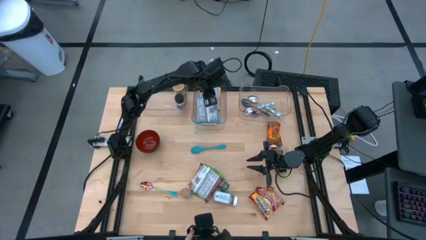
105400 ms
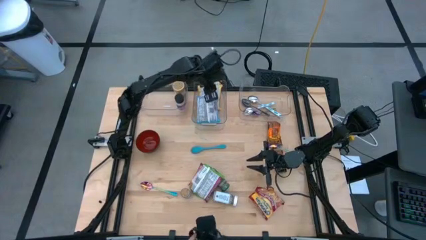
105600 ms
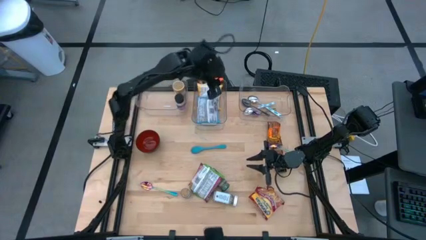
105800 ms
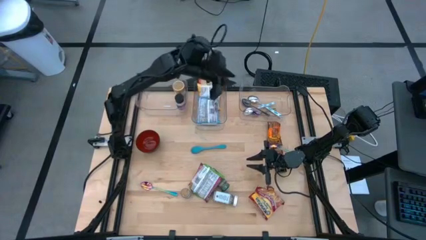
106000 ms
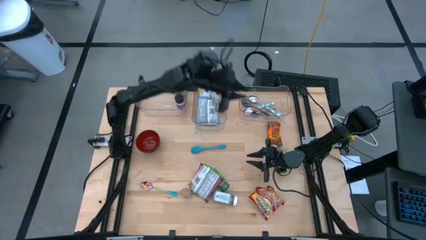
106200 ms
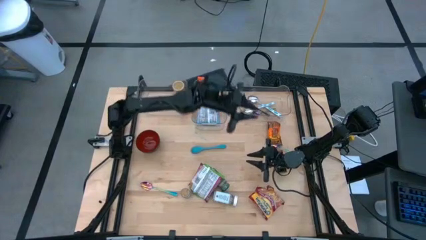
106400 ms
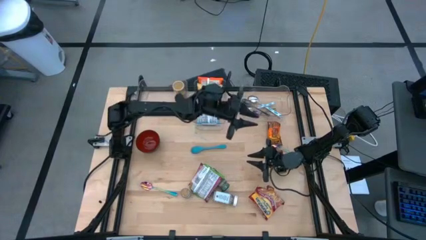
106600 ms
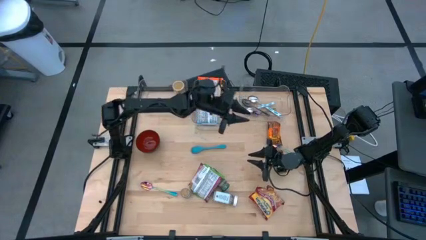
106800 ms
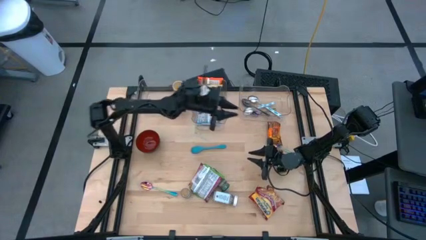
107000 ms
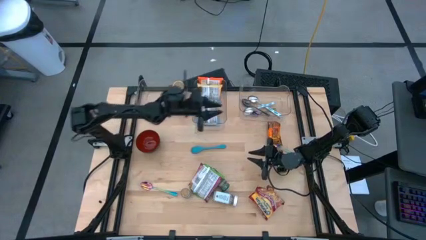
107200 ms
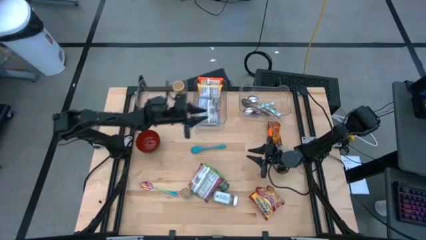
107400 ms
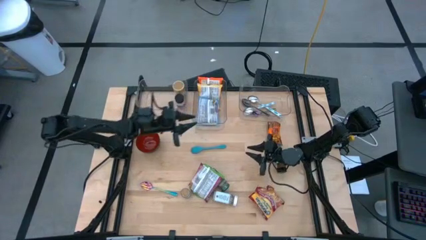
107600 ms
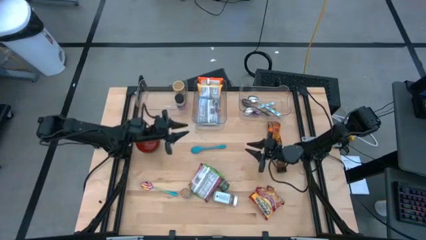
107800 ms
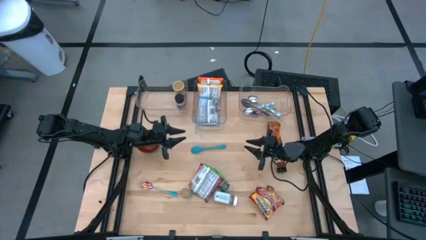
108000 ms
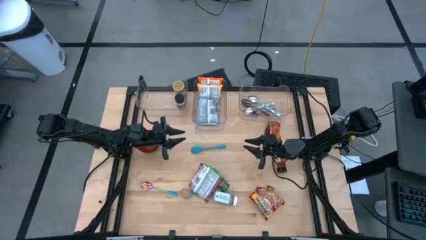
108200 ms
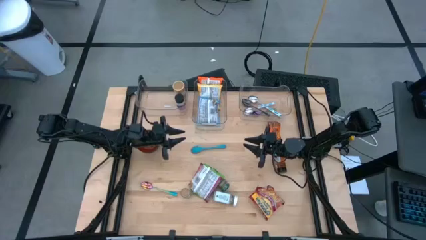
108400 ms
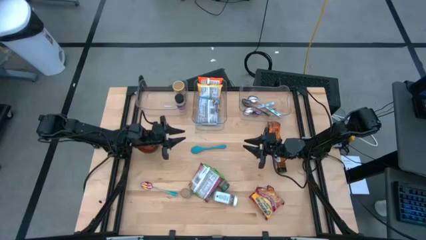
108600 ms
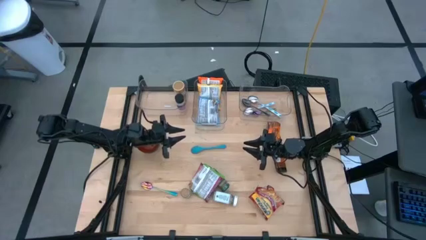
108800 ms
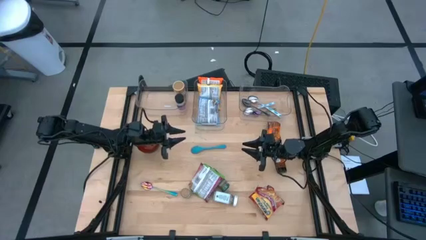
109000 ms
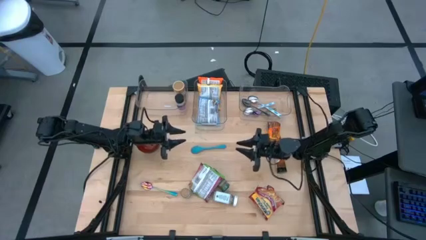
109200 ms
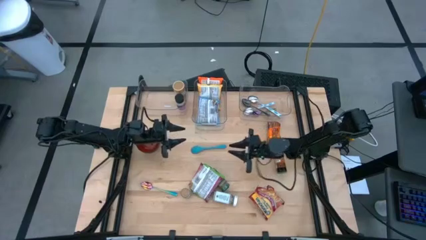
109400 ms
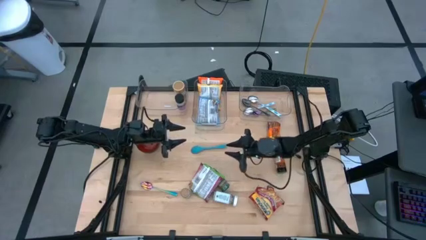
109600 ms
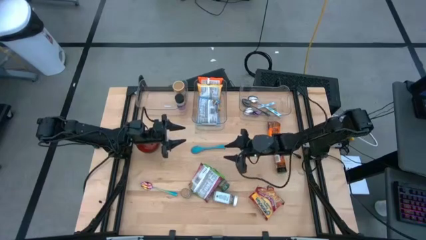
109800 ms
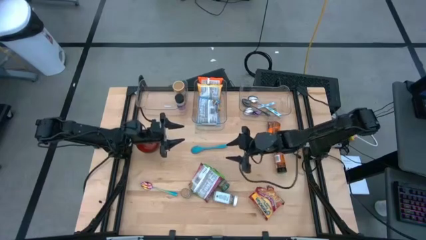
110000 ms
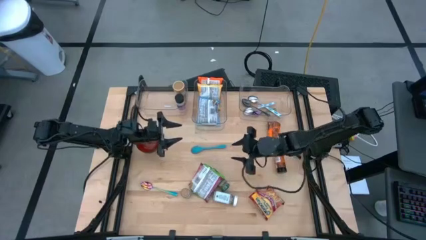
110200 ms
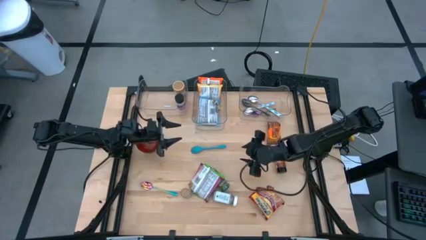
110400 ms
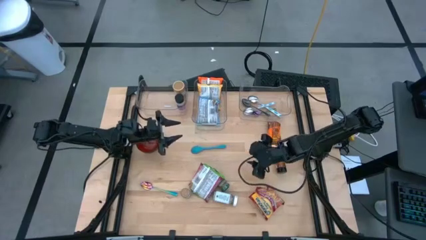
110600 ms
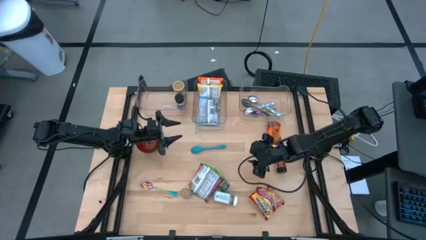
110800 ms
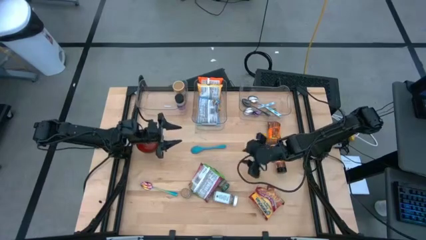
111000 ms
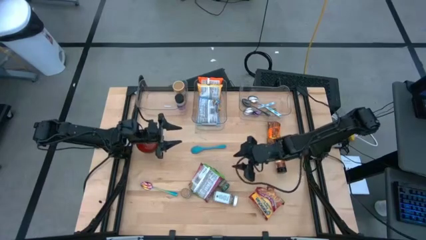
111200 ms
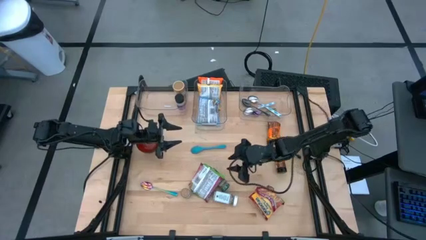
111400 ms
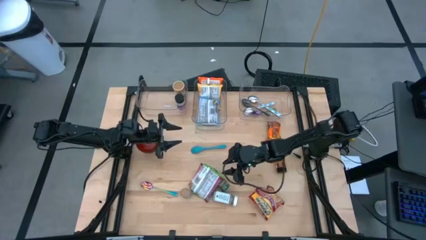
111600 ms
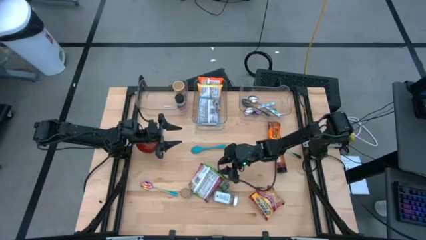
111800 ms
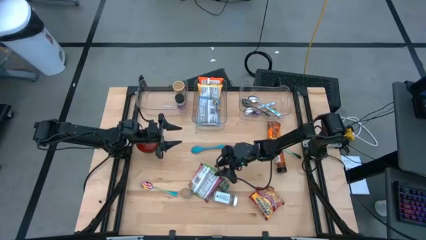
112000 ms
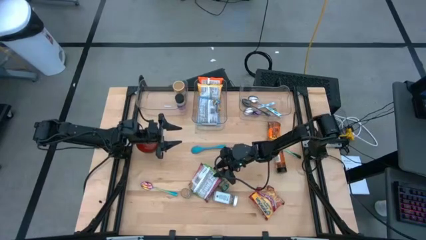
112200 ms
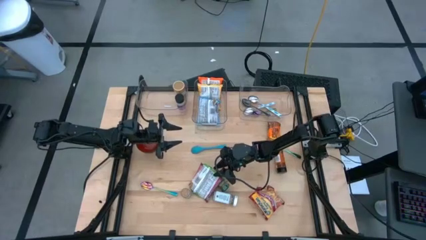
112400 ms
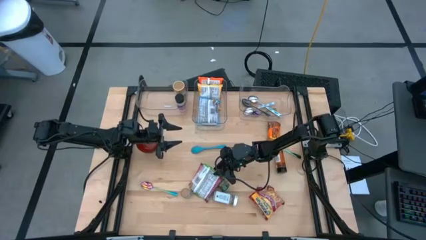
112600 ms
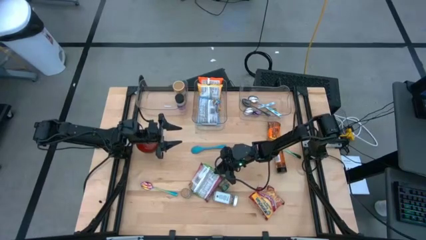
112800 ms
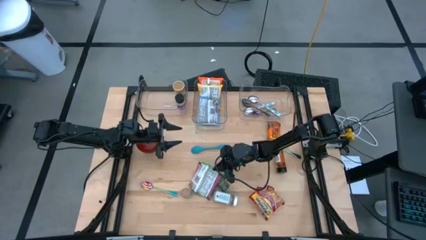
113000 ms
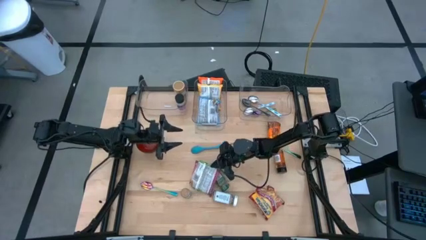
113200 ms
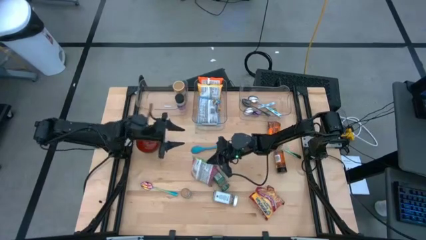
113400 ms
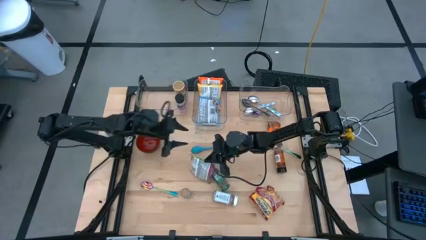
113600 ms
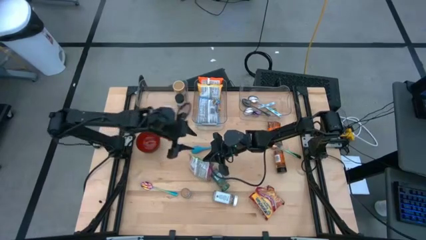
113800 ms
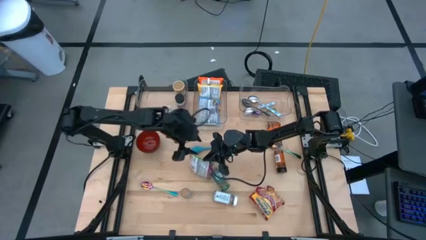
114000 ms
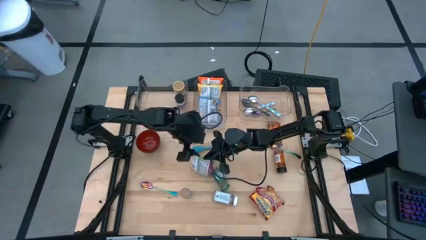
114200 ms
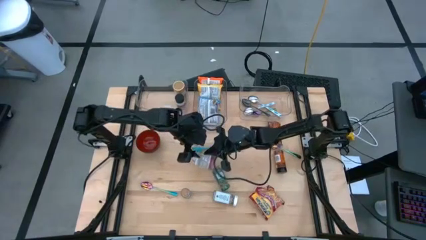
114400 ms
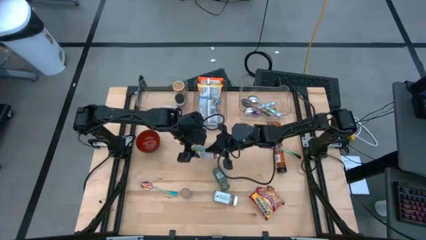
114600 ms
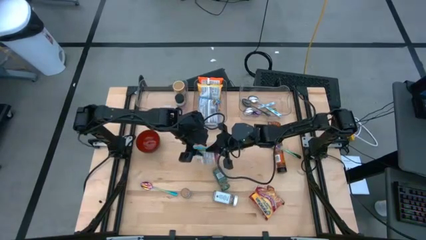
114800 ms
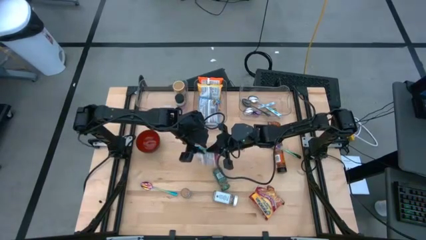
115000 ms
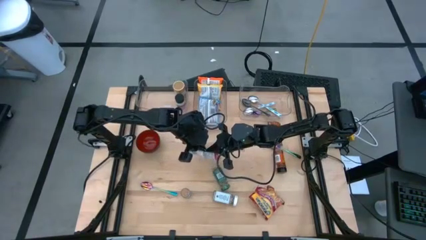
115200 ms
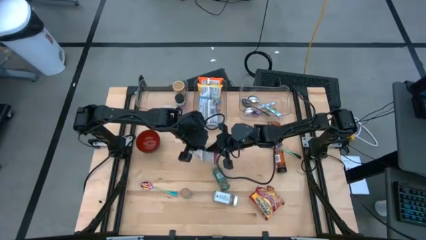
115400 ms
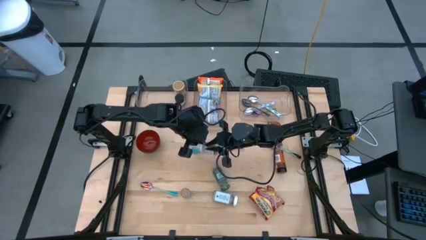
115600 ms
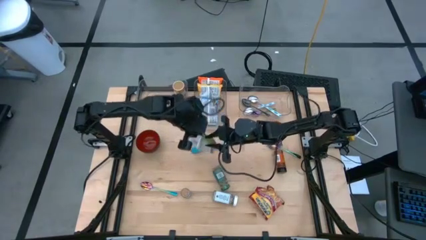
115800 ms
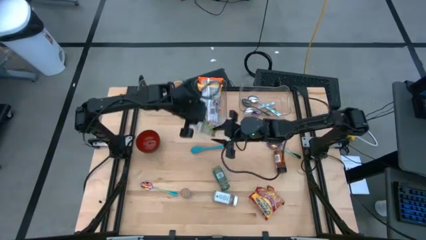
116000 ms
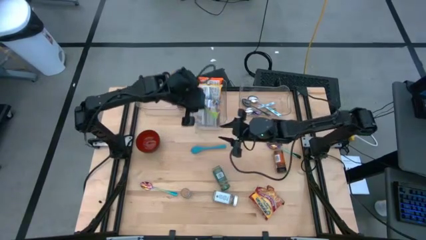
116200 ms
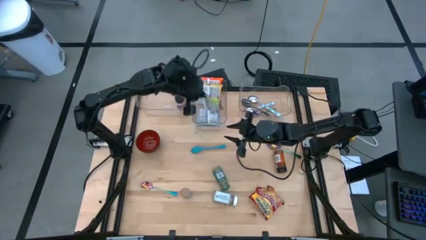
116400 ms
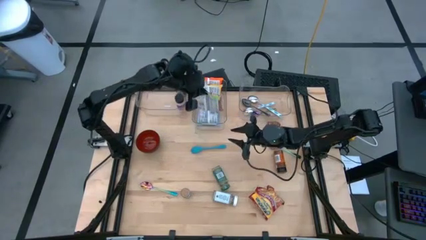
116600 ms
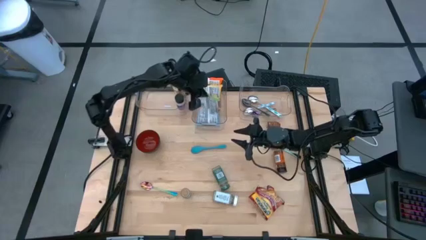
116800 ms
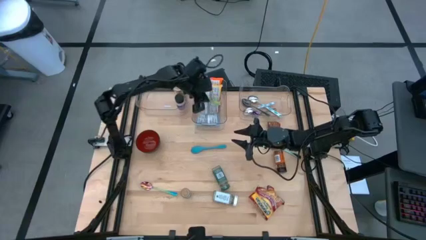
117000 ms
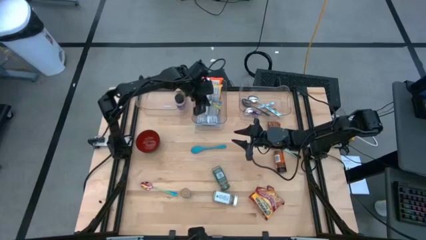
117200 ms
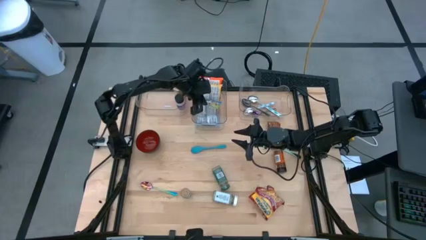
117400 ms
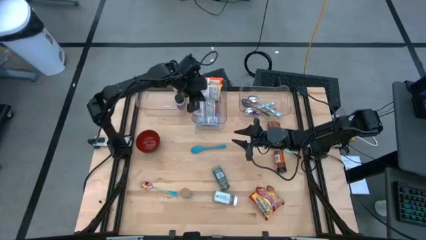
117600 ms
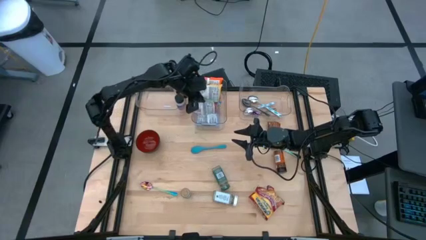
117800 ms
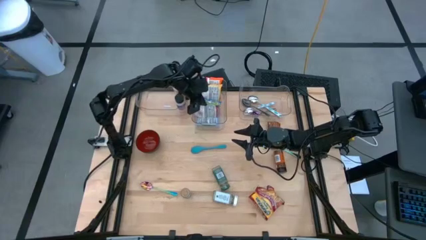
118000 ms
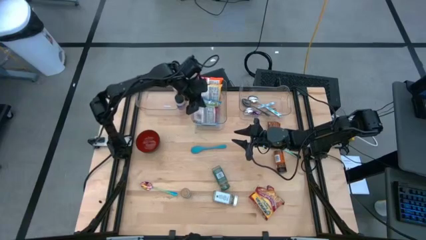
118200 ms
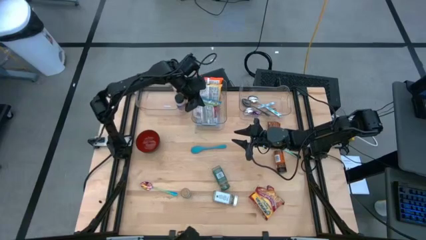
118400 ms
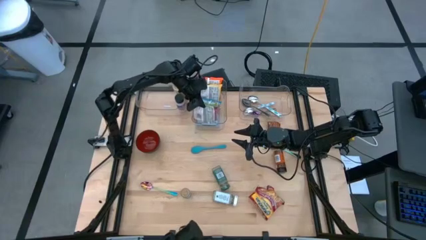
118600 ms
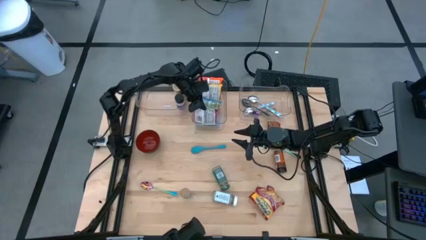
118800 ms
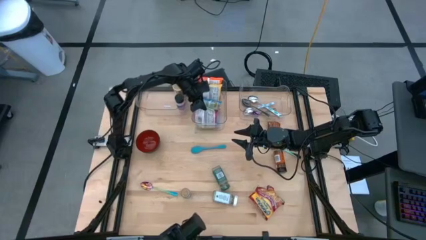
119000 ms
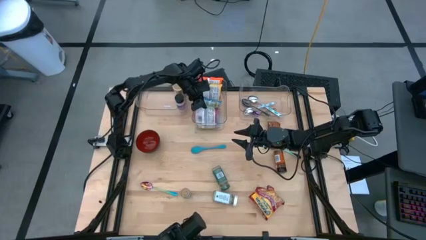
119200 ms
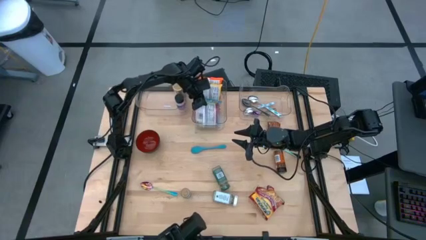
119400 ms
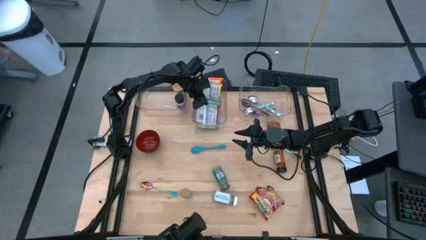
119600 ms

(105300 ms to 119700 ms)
Task: Pick & Place Food Item
Put the green noodle pack into the middle transparent bin

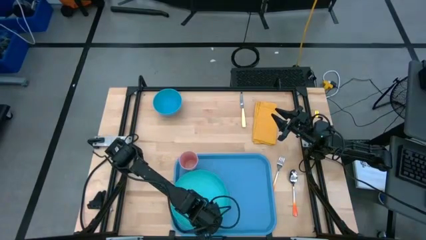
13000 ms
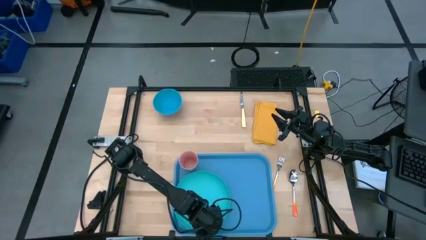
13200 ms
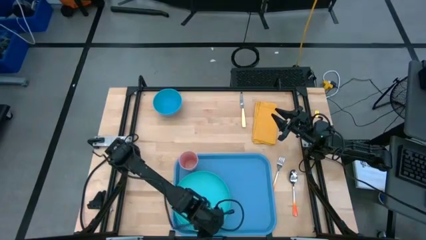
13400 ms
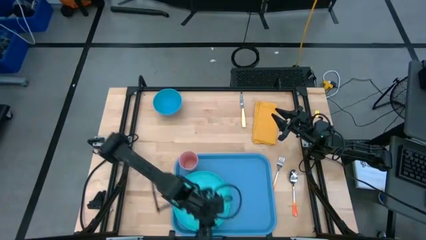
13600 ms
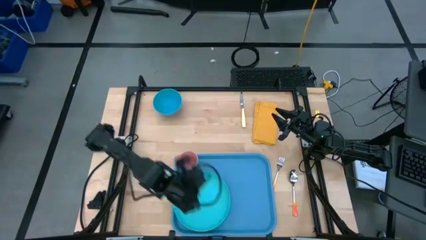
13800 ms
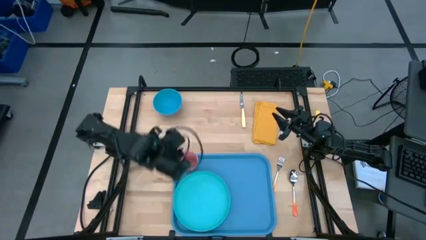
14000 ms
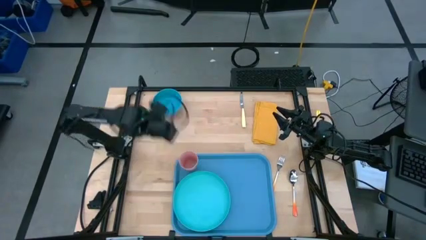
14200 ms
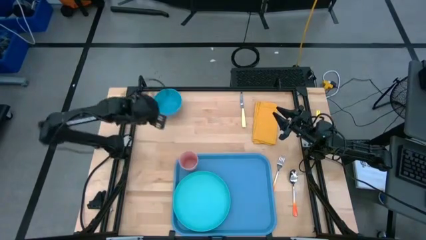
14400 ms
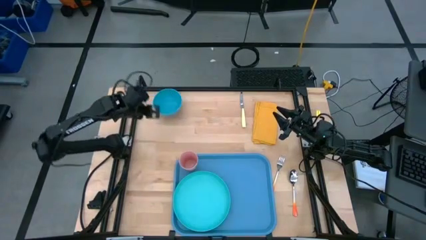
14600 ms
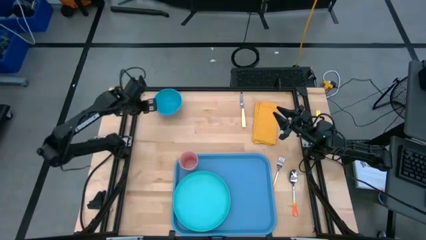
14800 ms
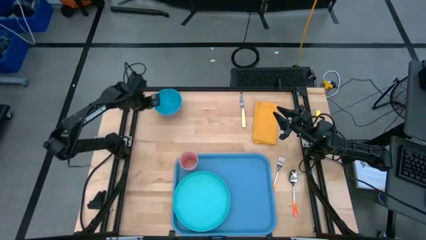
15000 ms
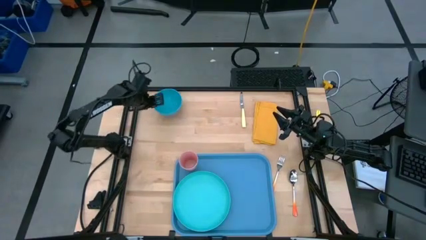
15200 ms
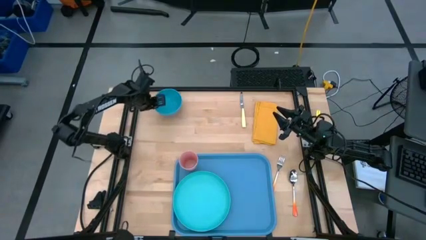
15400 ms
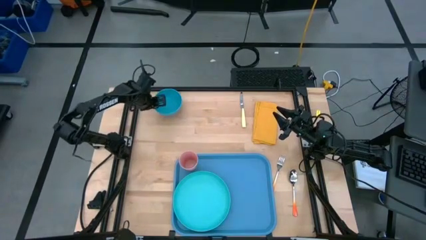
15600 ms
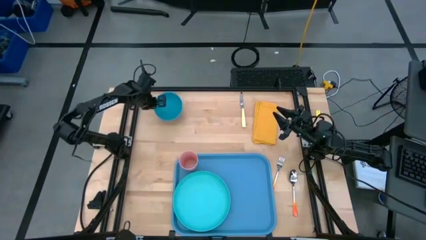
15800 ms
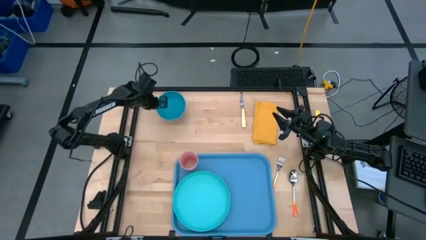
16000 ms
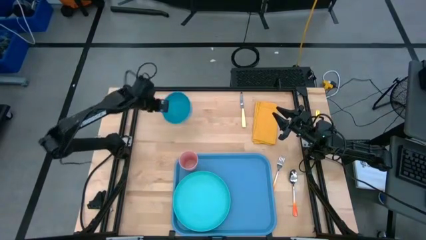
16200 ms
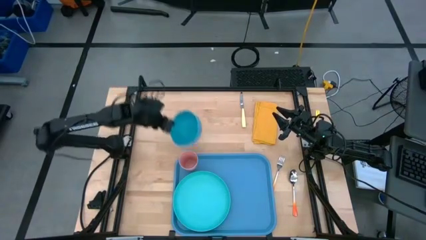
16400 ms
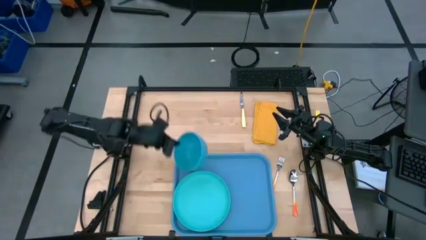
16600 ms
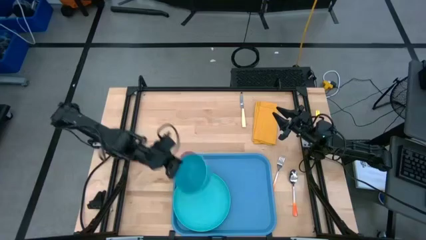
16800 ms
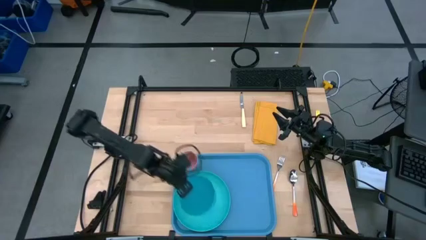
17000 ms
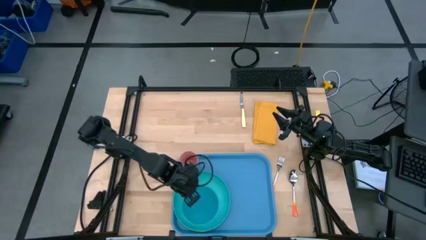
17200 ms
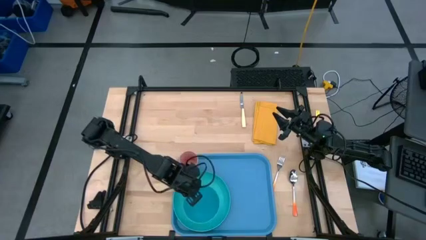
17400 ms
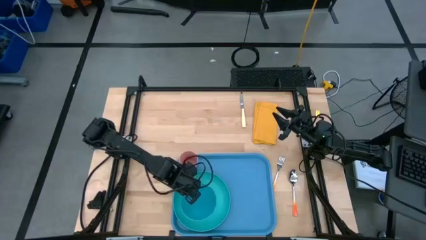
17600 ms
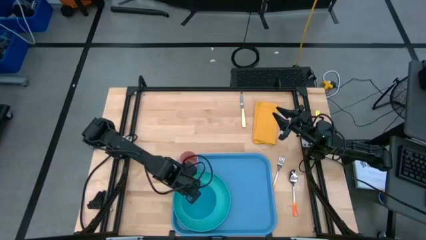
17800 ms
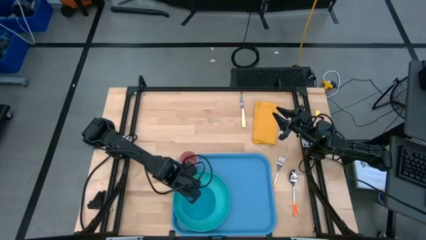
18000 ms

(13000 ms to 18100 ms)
Task: Set up tray
Put the blue bowl on the light blue plate
